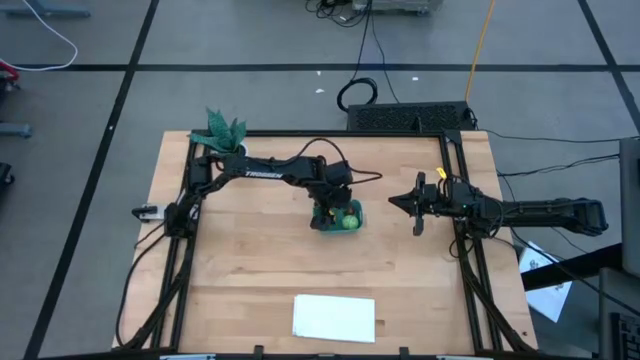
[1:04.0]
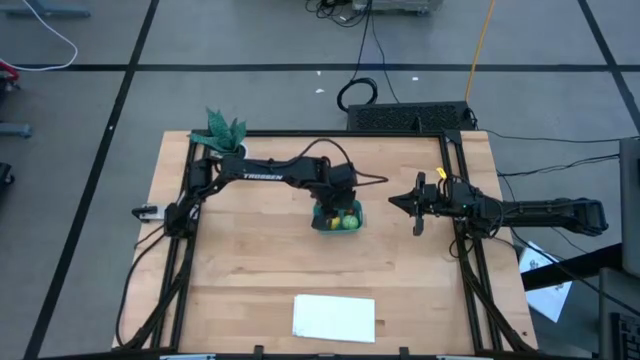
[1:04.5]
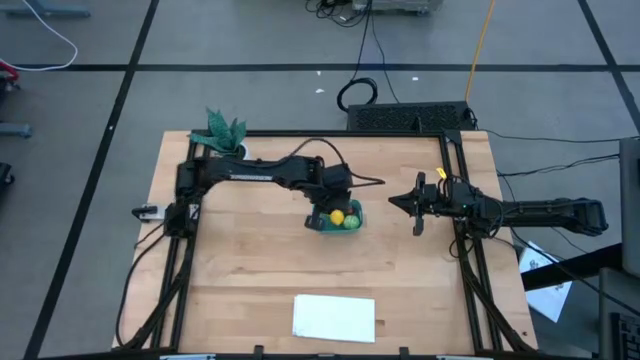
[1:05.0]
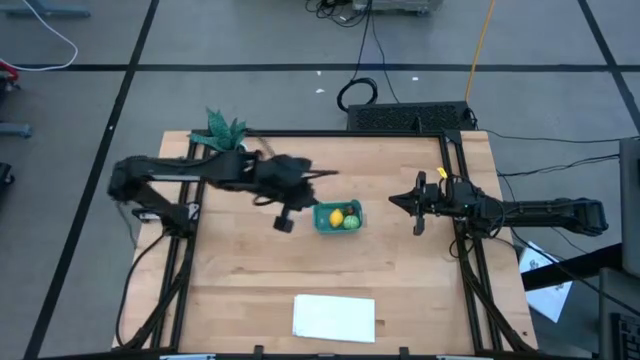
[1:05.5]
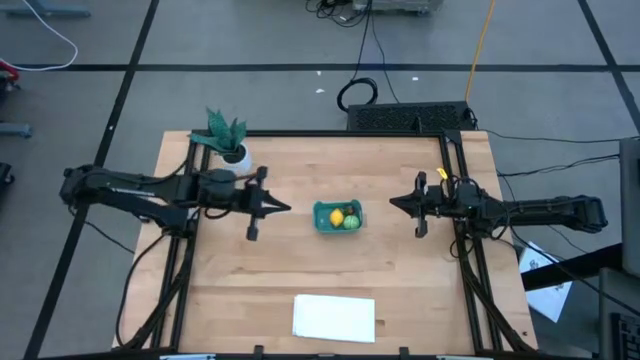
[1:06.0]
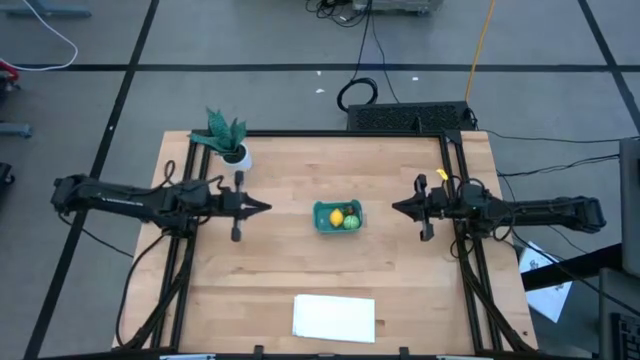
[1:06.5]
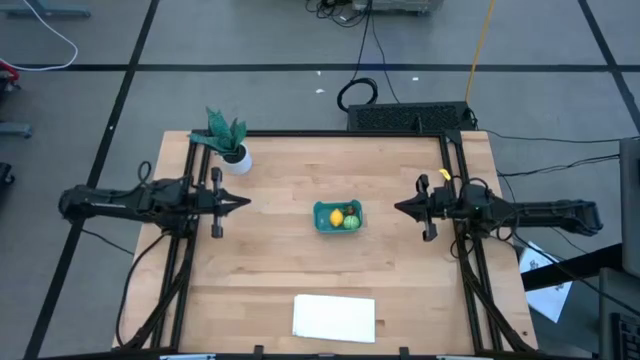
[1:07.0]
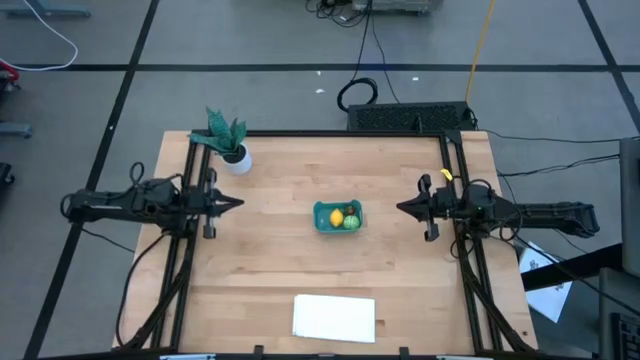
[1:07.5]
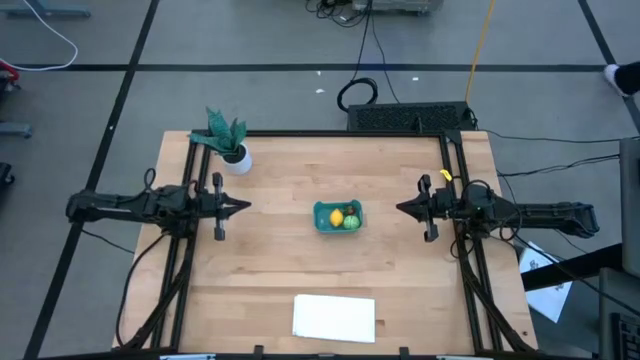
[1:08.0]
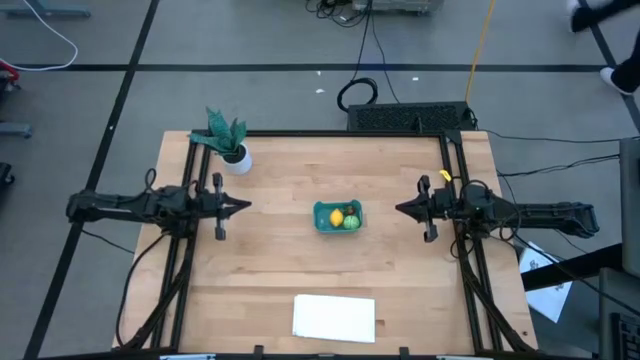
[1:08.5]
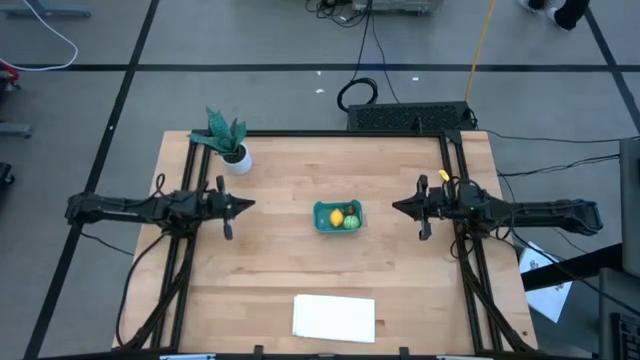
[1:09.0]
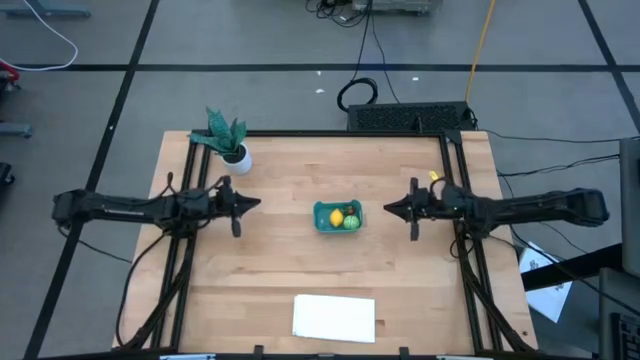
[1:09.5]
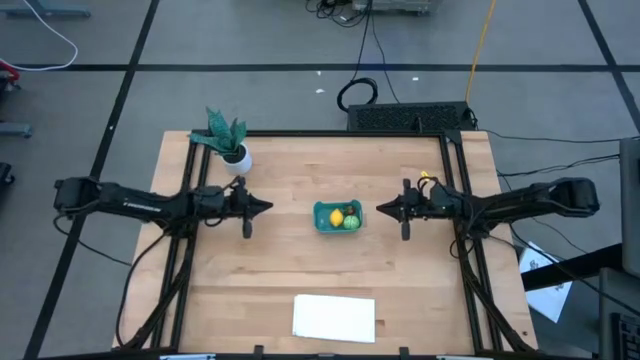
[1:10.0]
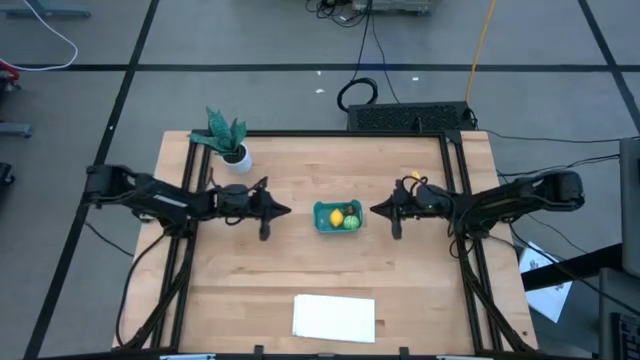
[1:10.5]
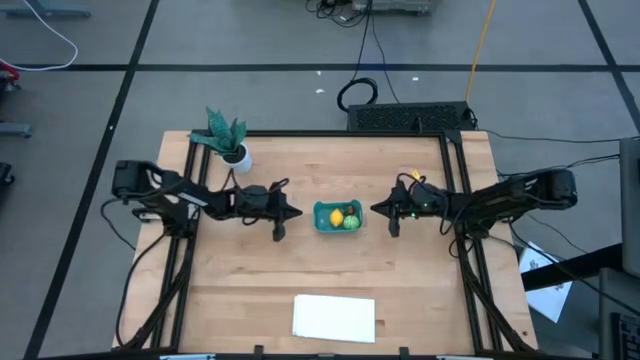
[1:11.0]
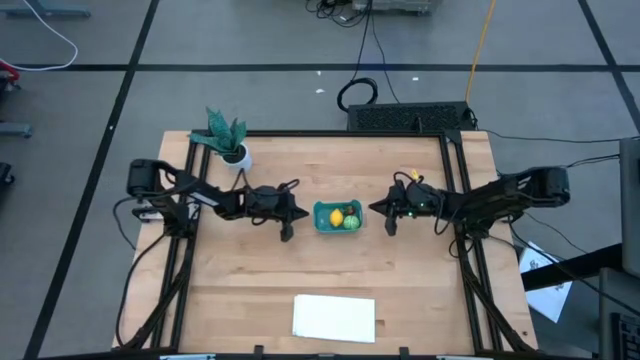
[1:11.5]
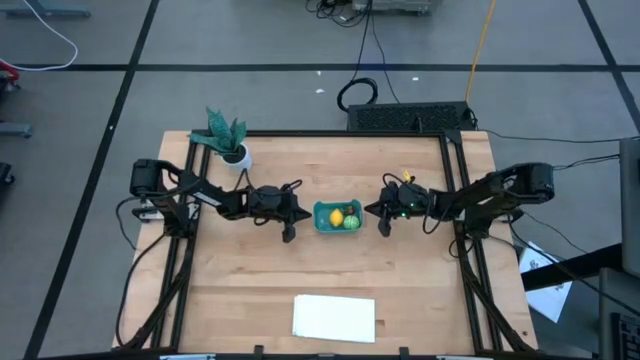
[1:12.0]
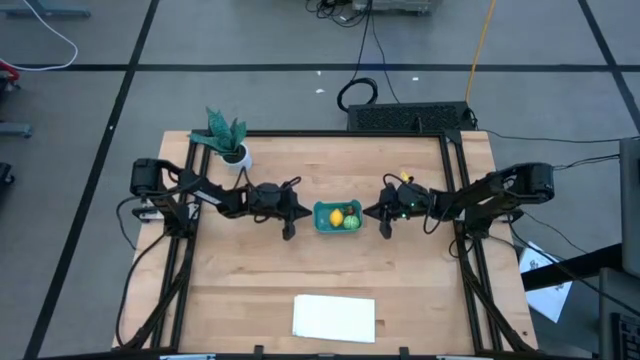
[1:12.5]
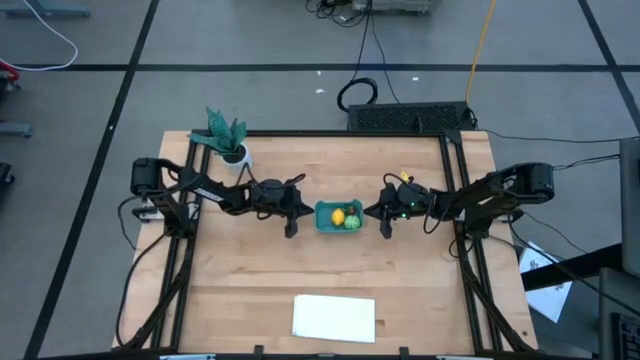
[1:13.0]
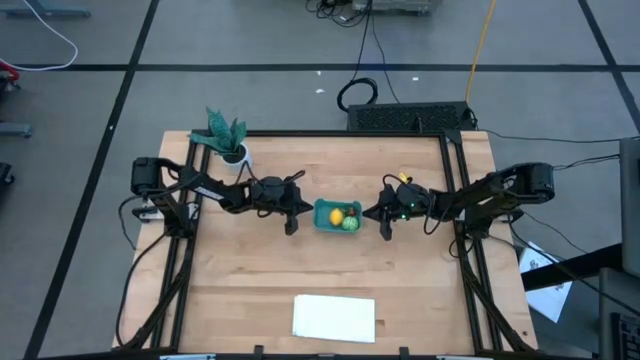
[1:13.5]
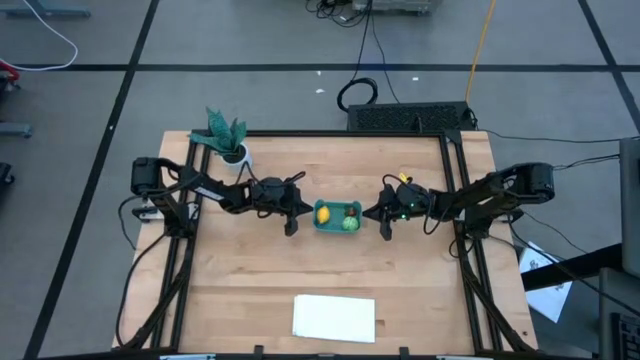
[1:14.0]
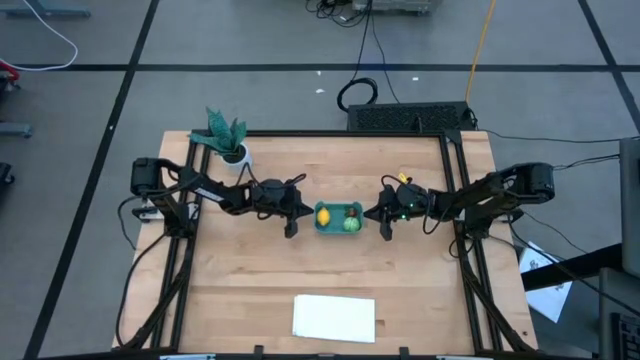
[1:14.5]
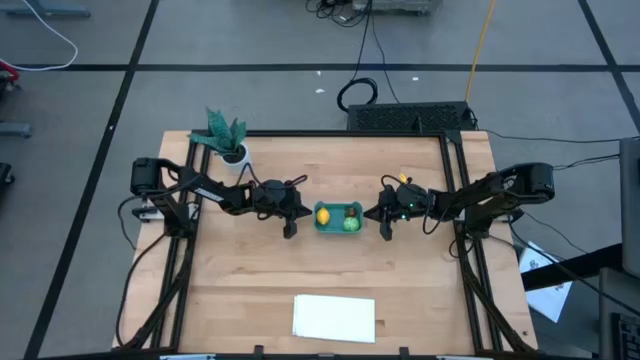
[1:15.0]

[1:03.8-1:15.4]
Task: Pick and placing Produce into tupperware
Adjust the blue bin

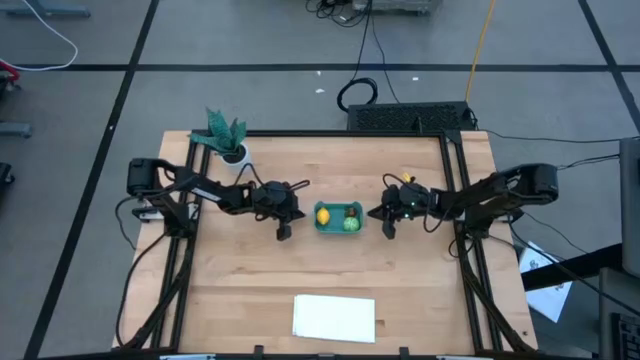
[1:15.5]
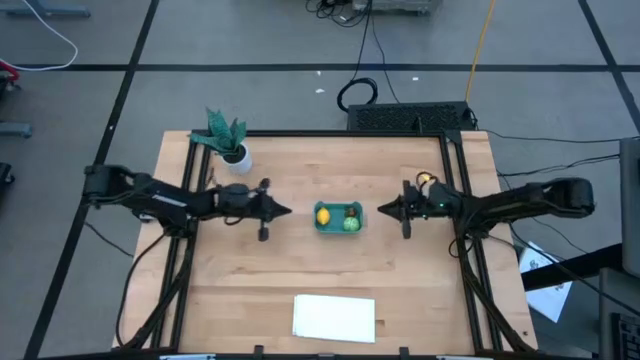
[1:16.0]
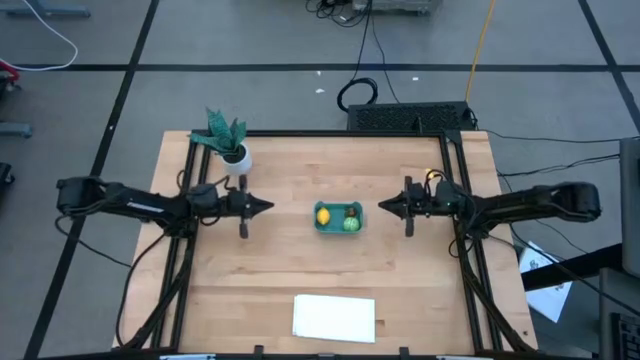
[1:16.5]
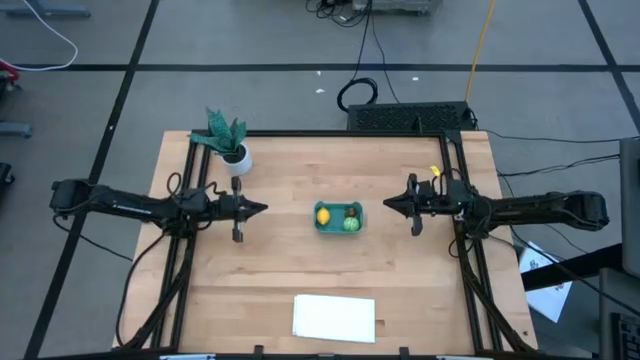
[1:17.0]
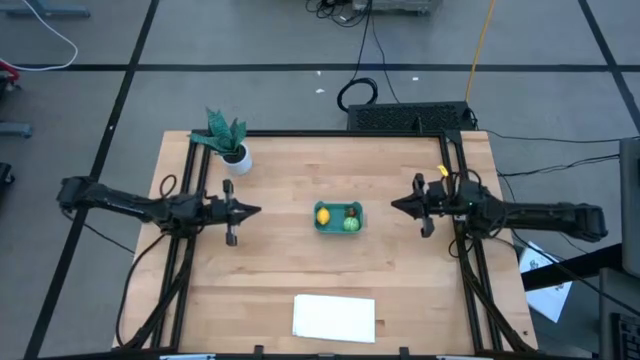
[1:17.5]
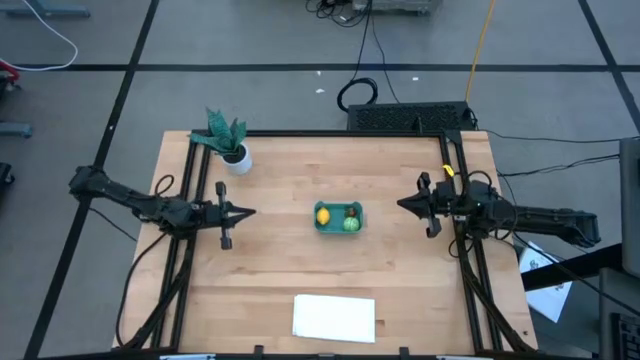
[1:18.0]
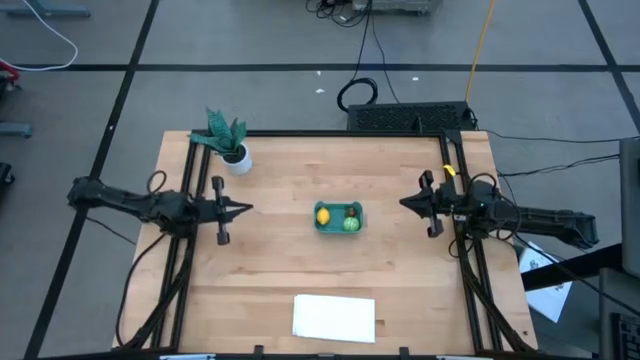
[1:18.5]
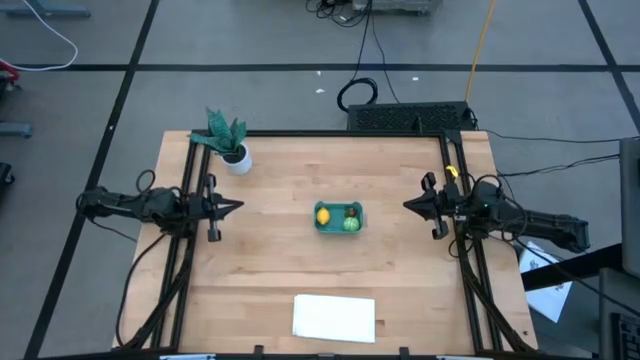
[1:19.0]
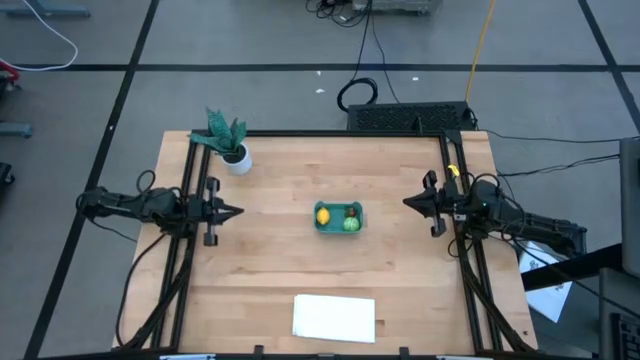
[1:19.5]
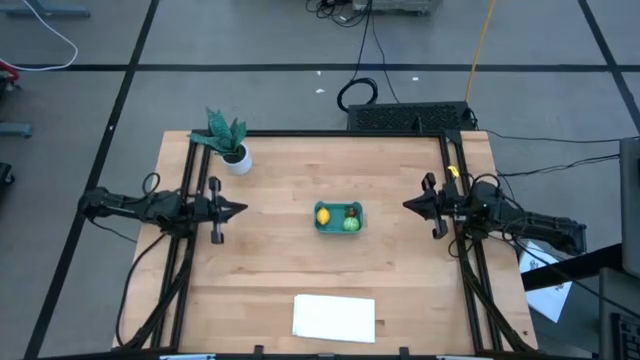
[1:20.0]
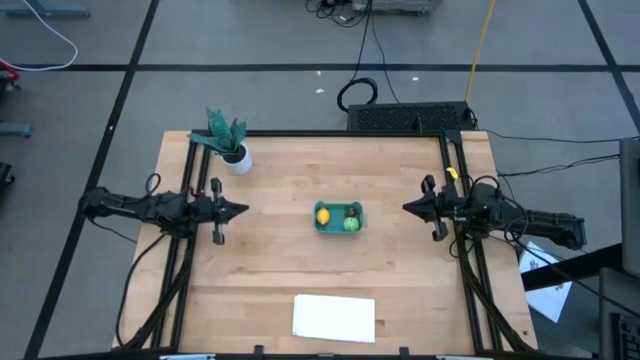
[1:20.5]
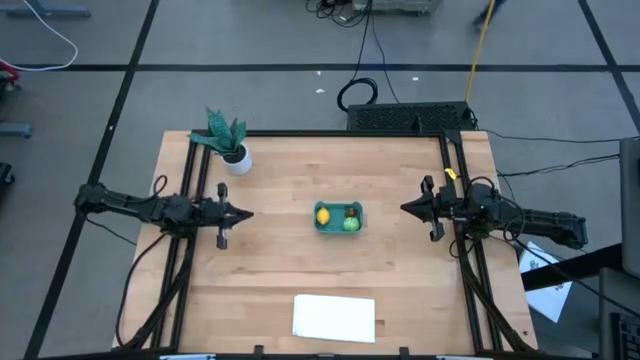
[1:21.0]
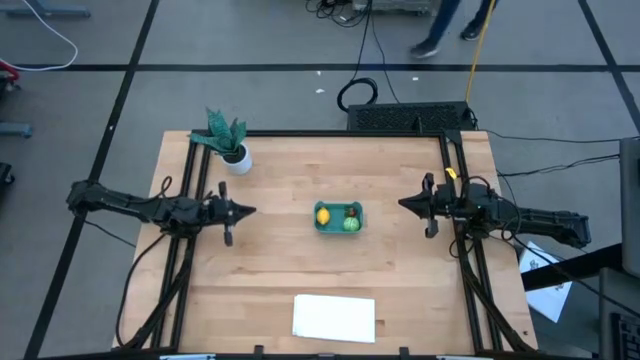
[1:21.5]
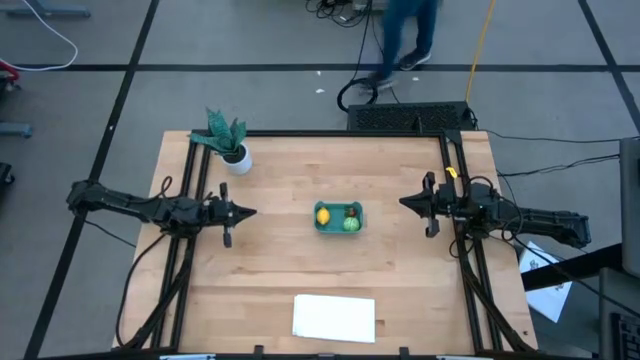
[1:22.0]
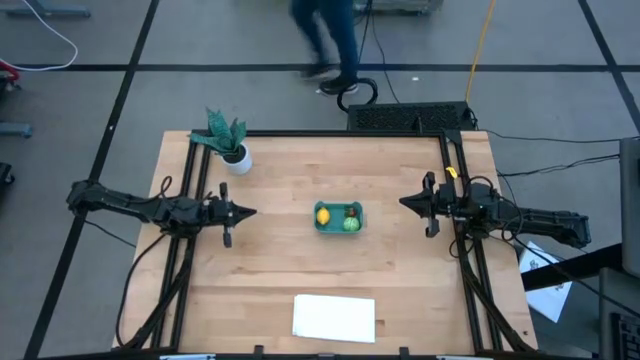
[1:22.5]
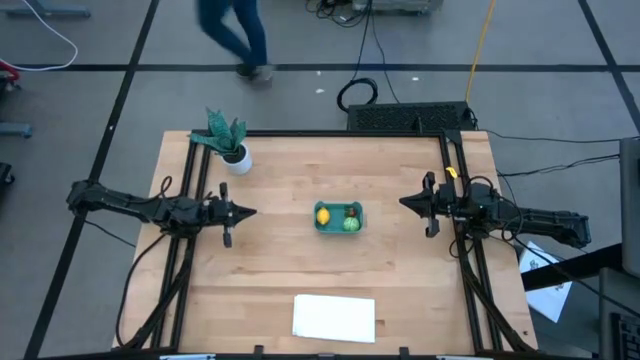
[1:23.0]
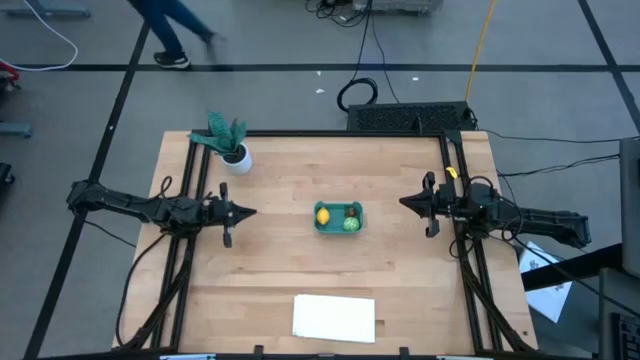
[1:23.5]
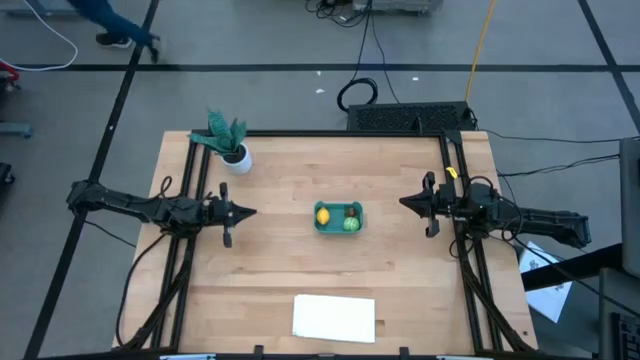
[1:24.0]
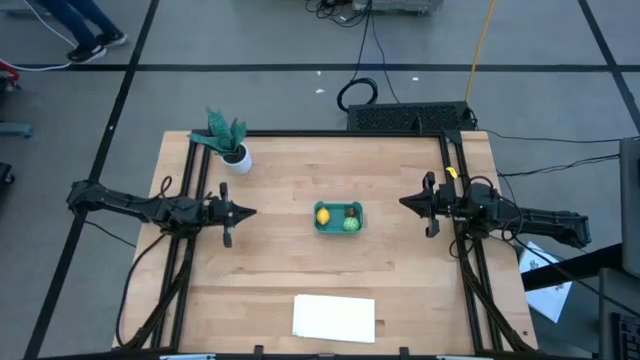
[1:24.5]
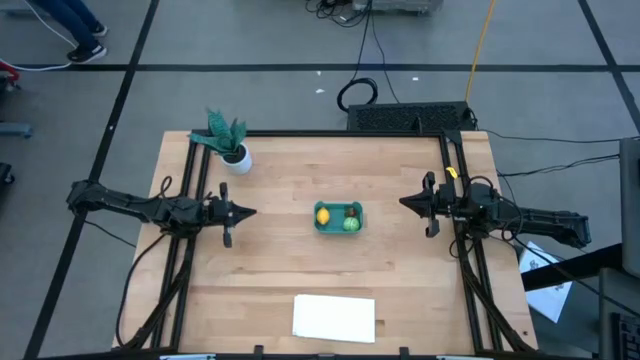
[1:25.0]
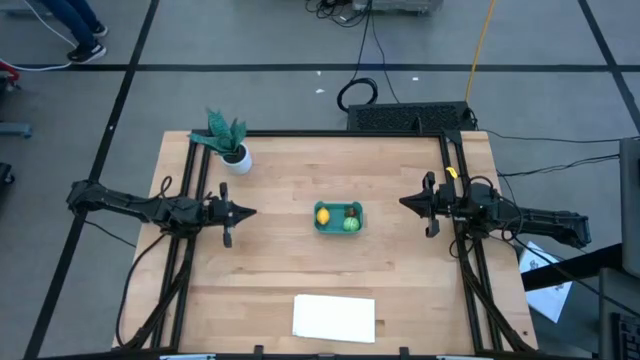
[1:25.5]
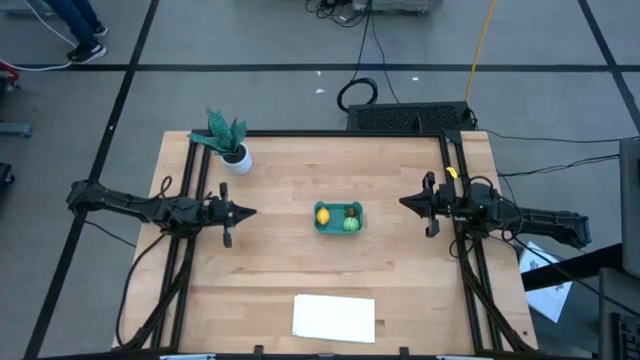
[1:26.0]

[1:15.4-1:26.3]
Return to Home Position
